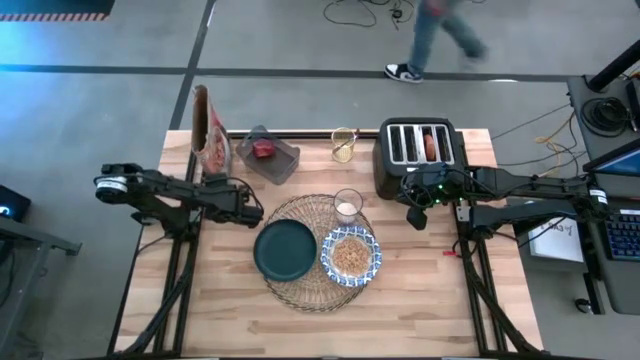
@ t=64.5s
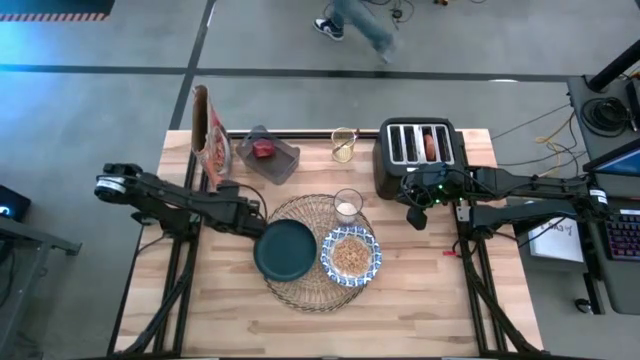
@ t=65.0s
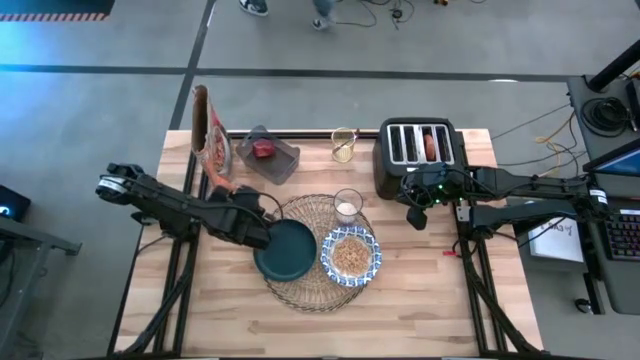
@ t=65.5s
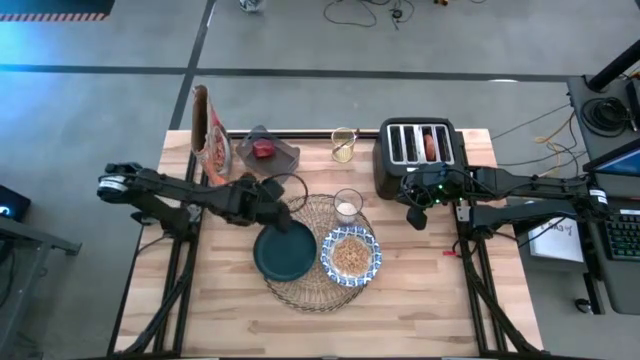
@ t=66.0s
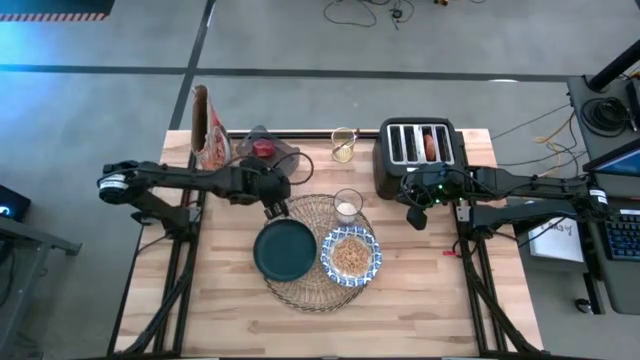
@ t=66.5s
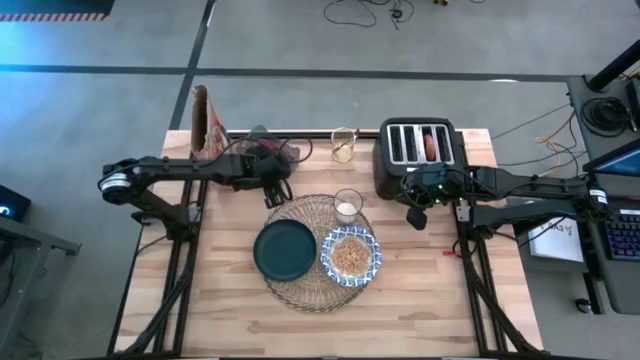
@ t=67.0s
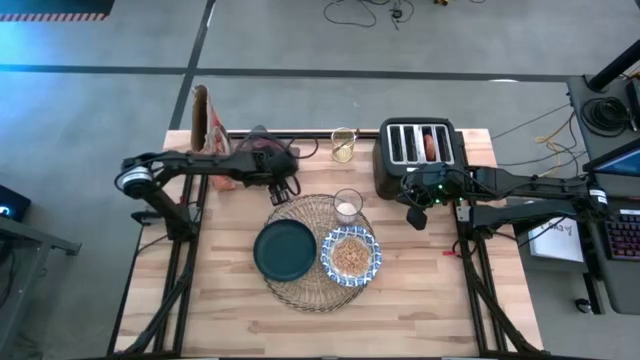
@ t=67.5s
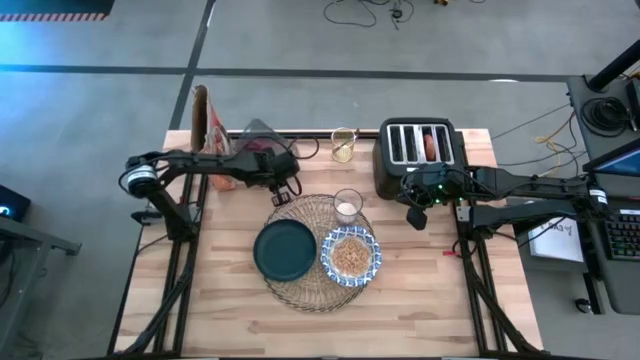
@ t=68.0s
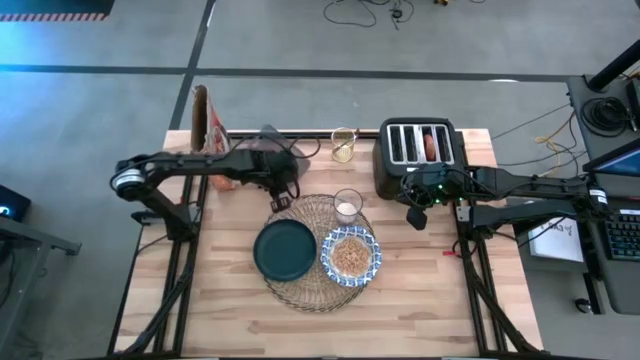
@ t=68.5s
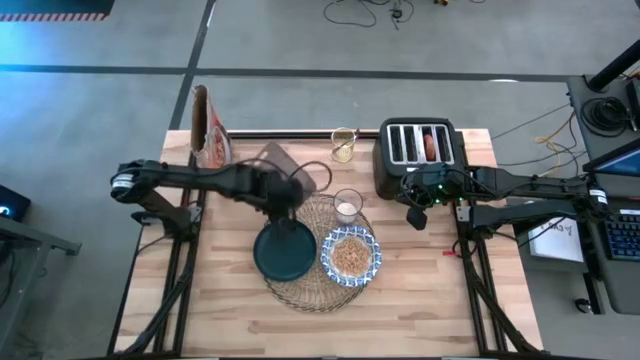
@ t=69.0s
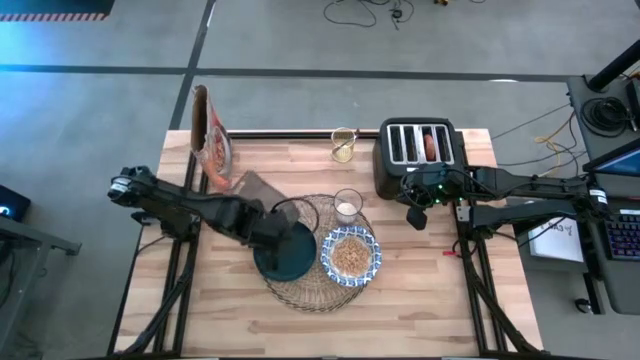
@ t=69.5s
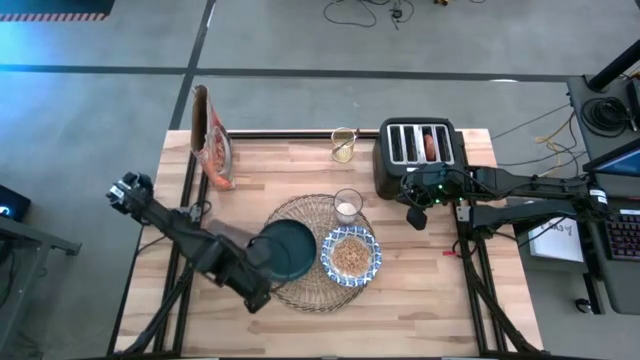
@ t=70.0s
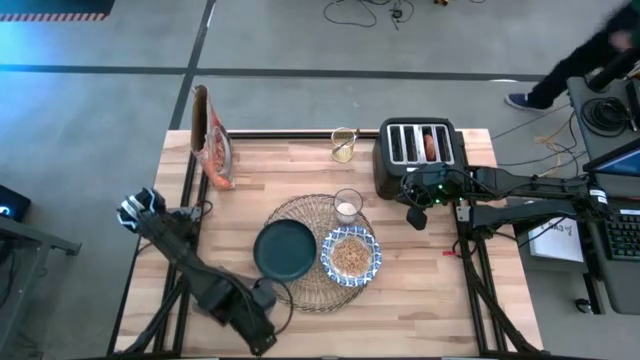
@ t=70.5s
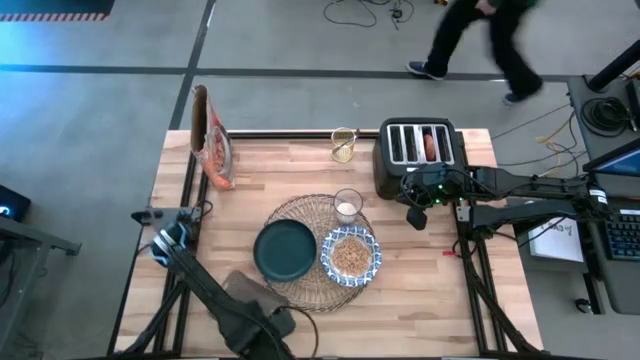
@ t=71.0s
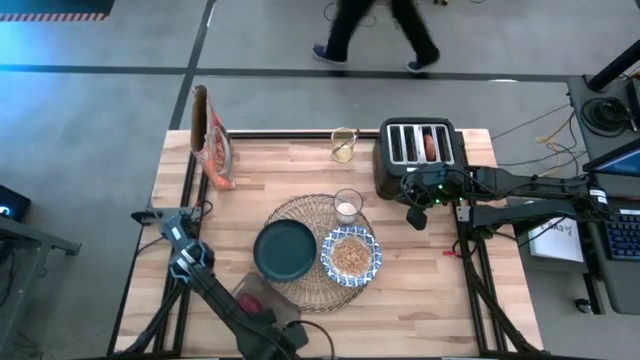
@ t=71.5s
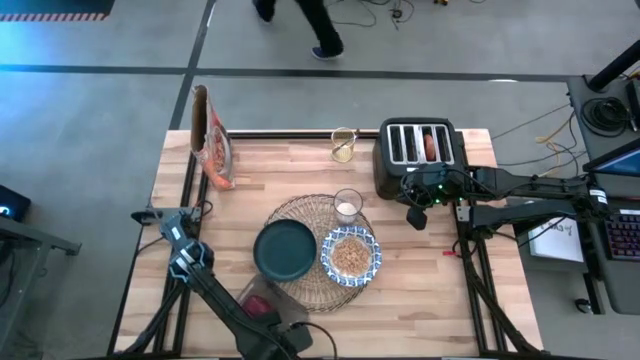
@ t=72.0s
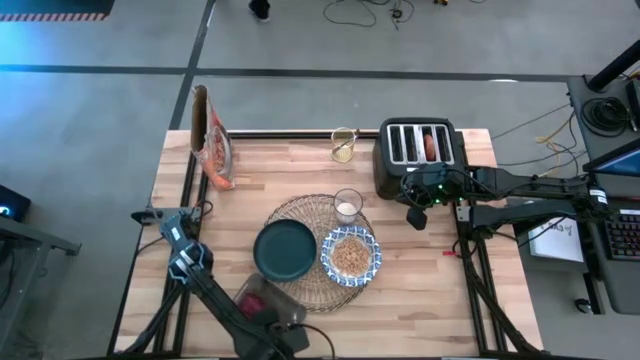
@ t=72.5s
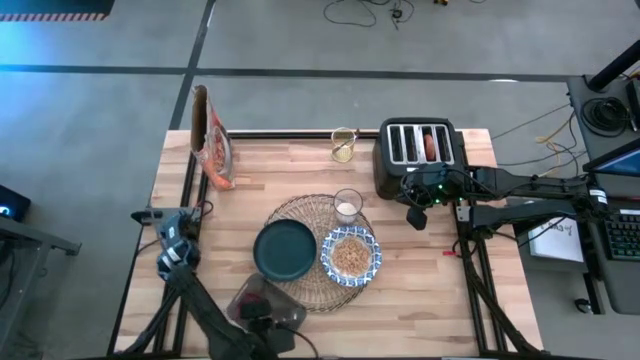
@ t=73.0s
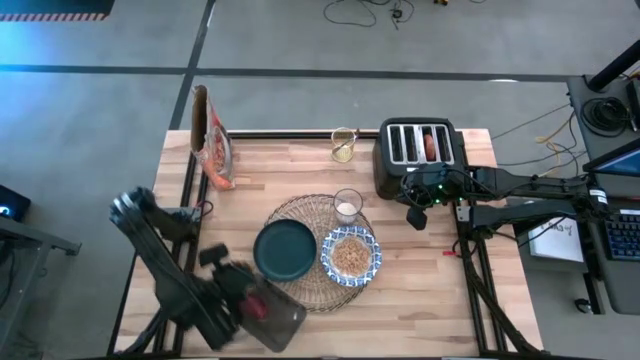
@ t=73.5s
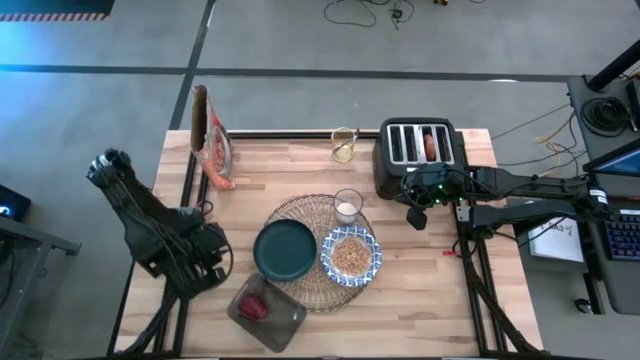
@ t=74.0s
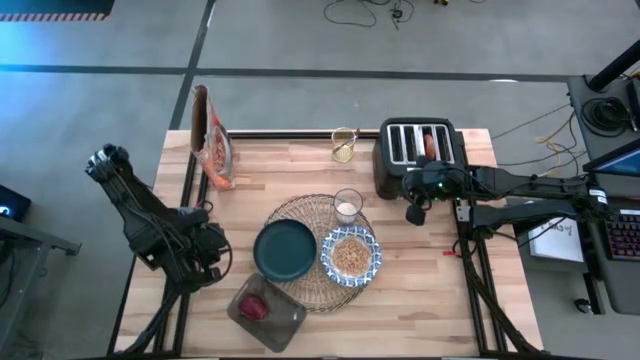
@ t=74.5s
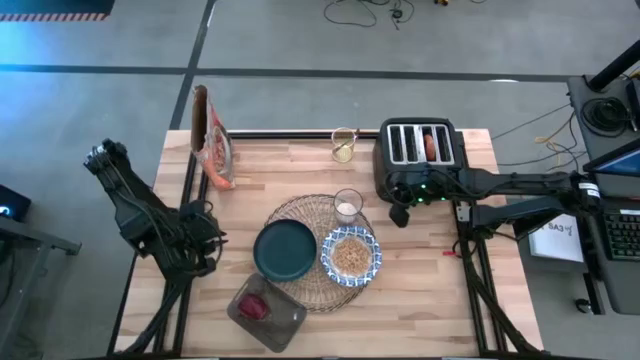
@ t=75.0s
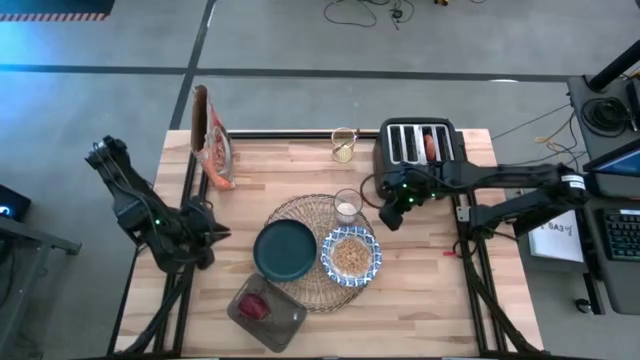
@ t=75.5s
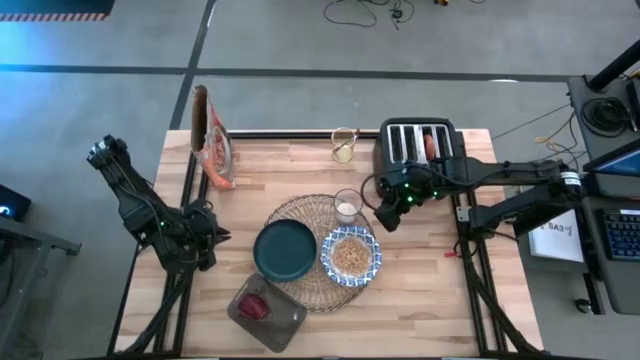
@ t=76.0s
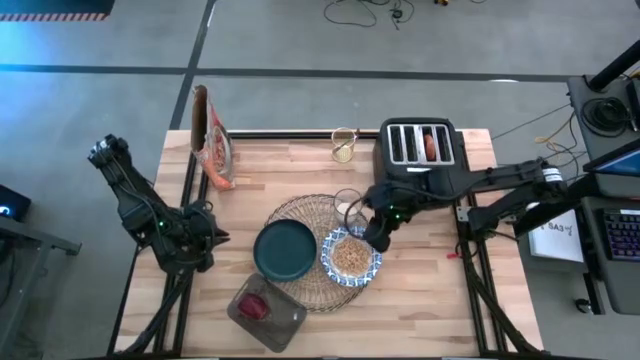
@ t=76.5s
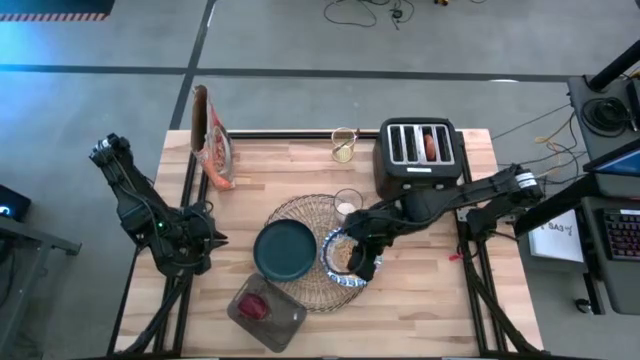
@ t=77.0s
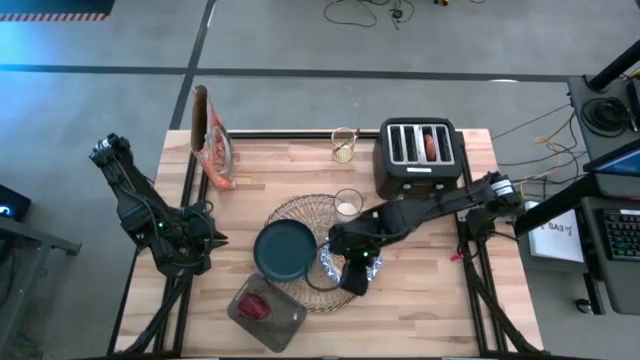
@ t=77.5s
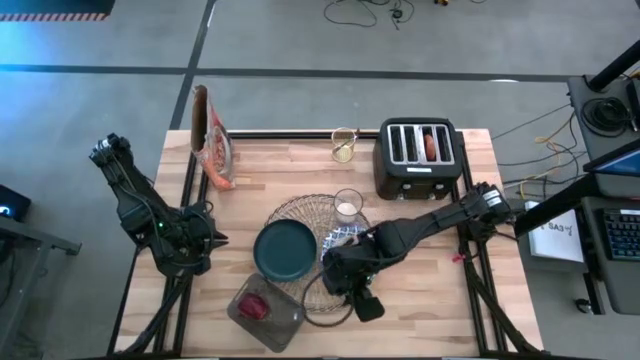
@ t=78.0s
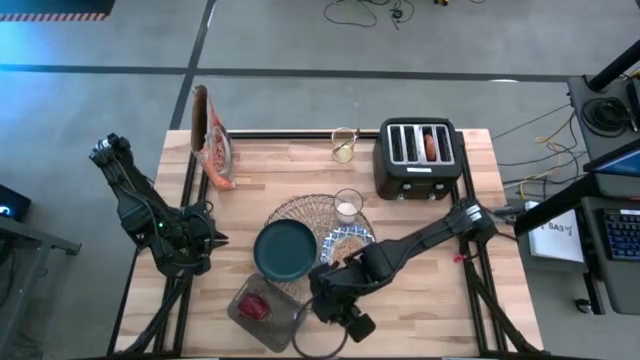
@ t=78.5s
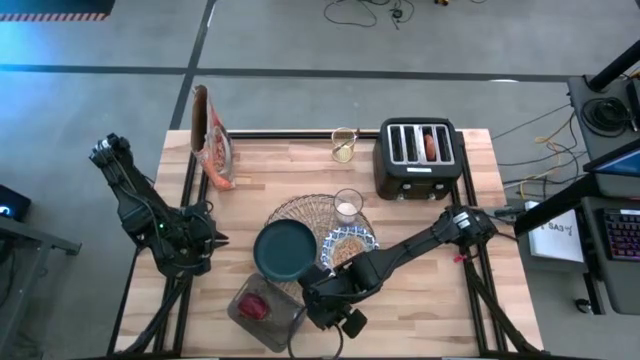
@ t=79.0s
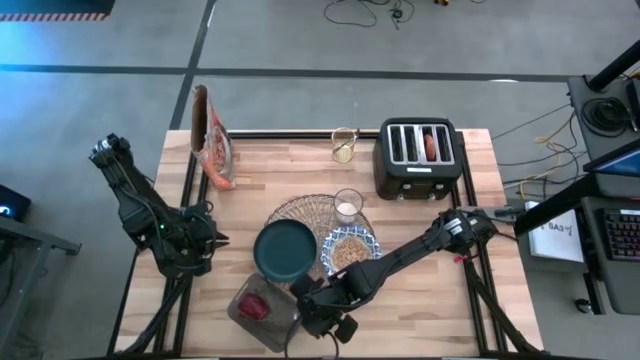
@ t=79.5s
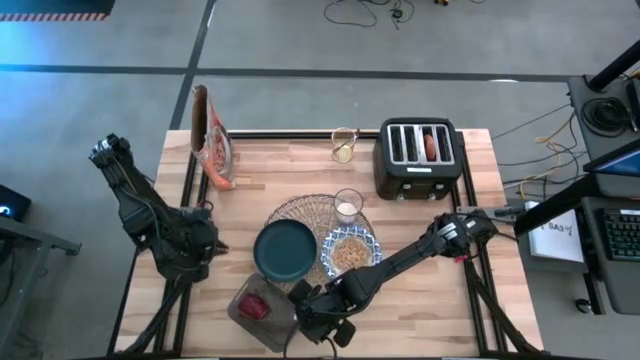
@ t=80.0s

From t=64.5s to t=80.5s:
Task: Arrange a breakfast setting
Move the black bin to the bottom right of the table

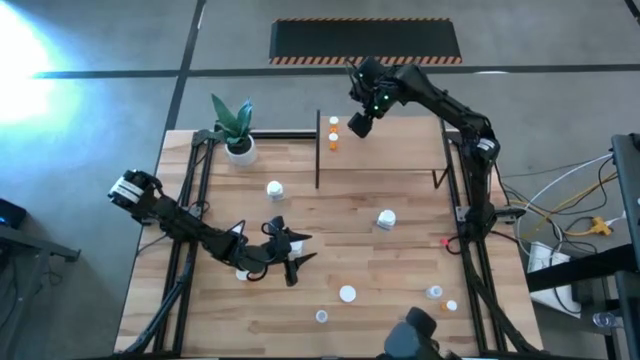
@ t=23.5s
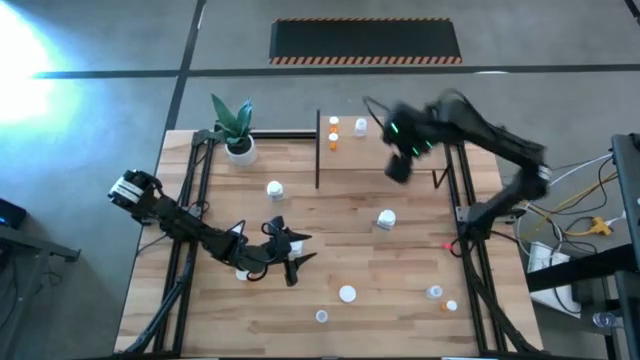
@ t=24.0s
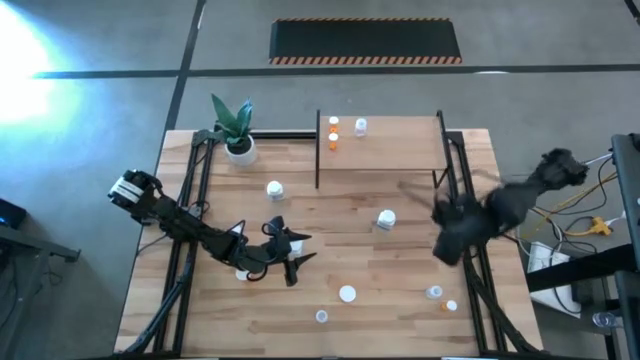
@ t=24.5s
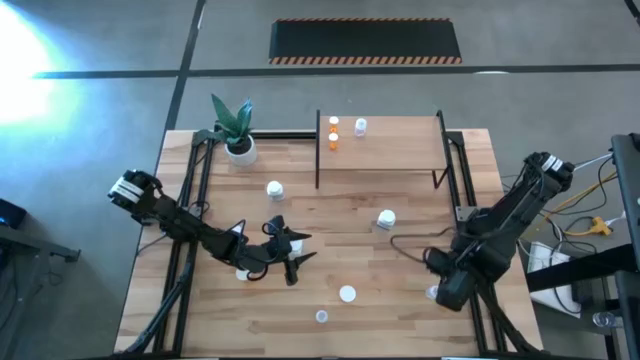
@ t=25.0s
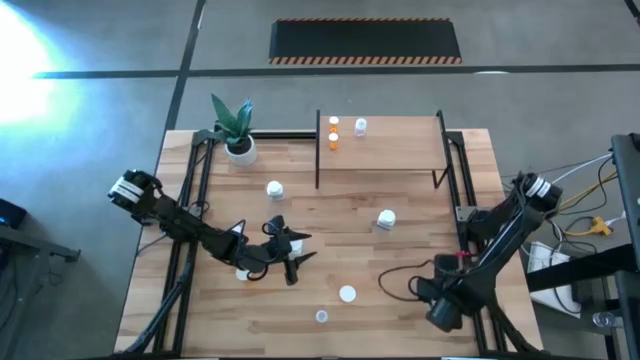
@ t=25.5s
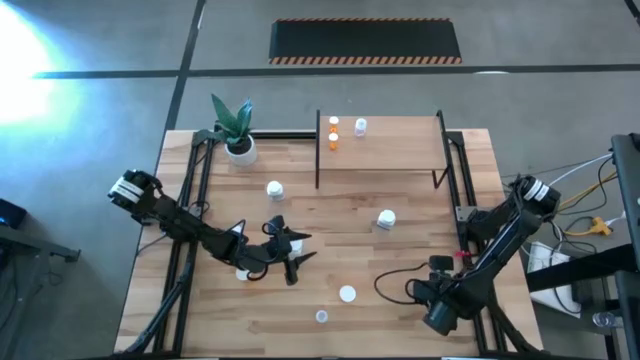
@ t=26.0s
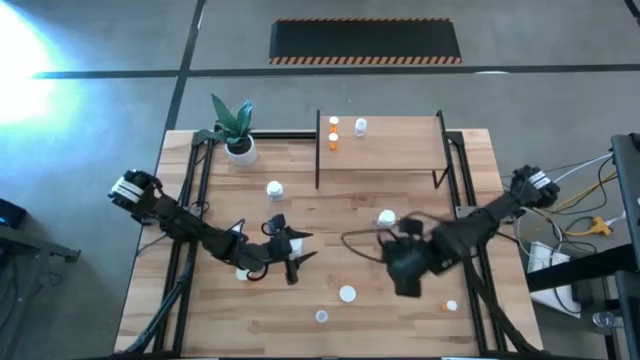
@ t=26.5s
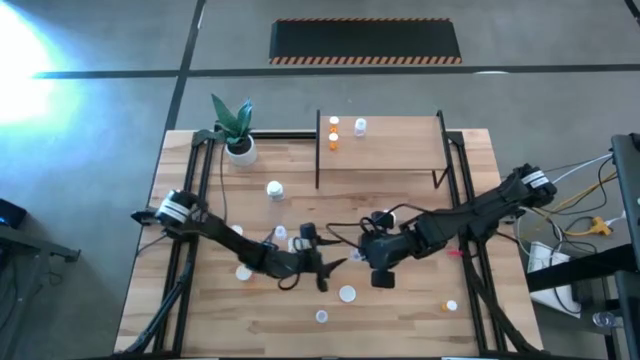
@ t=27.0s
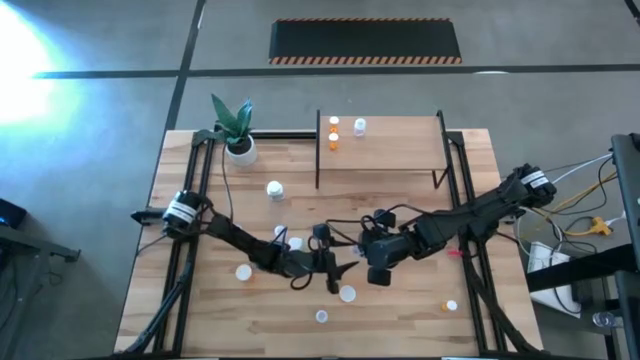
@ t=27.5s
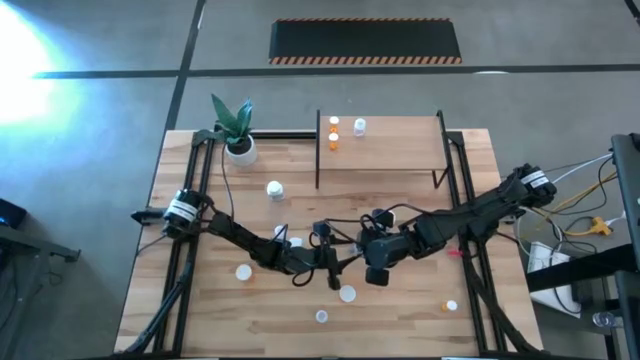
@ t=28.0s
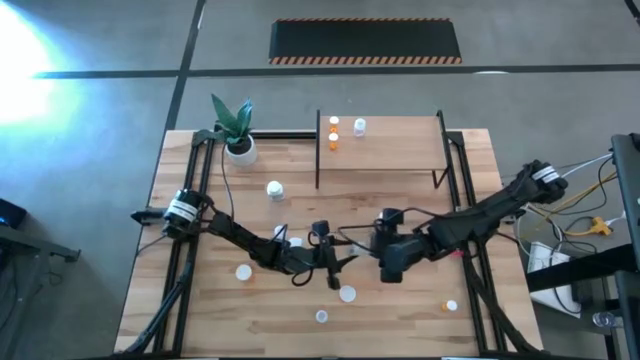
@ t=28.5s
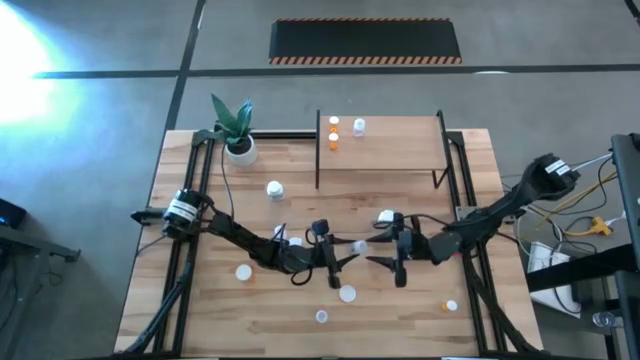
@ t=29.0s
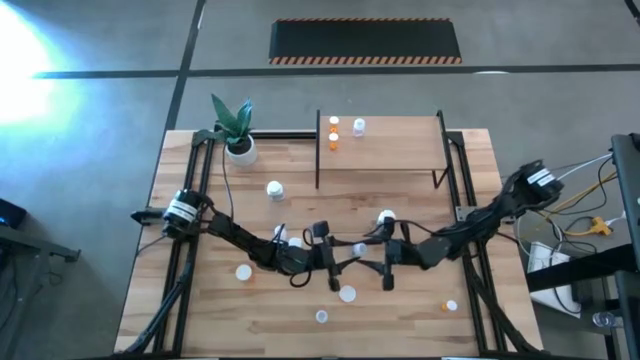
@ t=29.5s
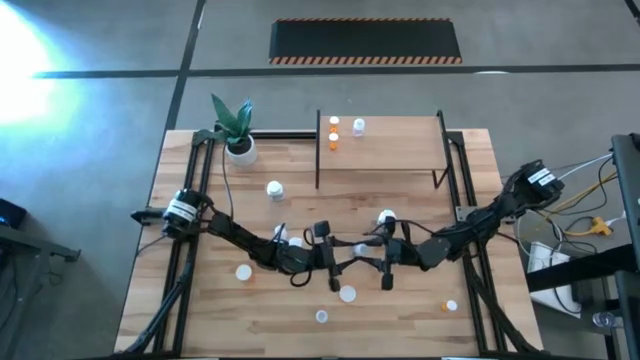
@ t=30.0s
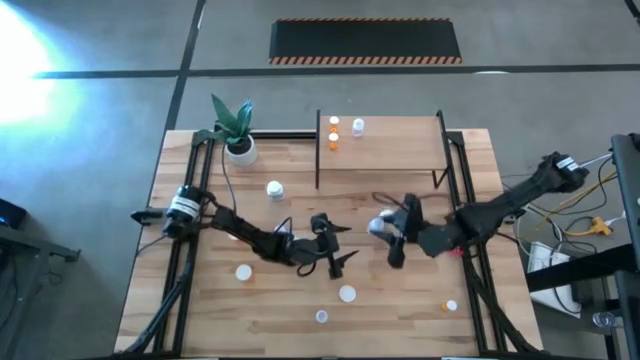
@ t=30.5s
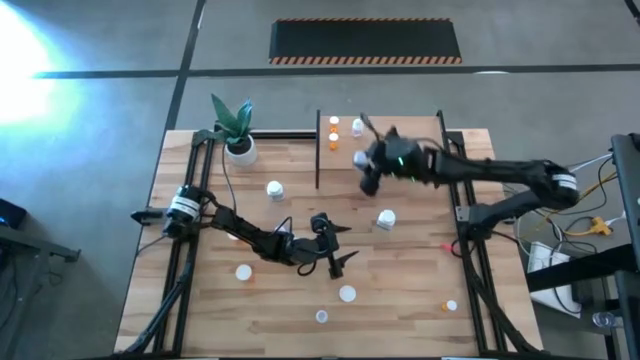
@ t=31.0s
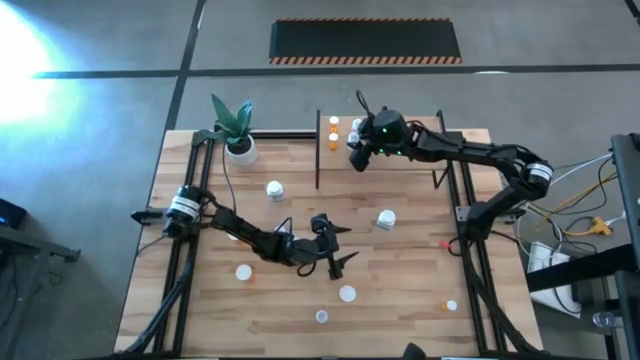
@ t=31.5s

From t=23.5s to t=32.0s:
Task: Pick and place medicine bottles onto shelf by color
Put the transparent pill bottle on the shelf aligned with the other transparent pill bottle
